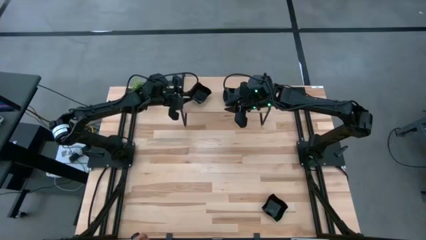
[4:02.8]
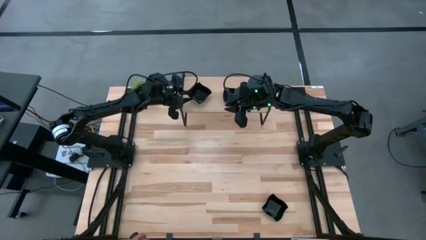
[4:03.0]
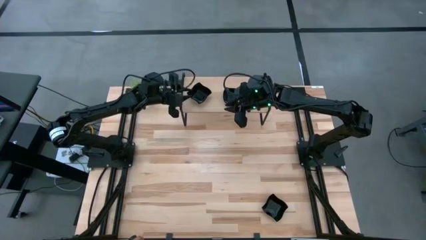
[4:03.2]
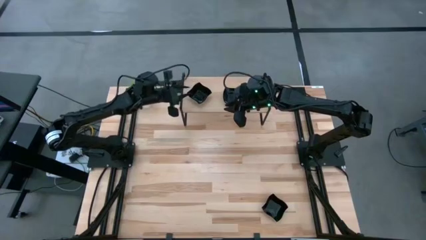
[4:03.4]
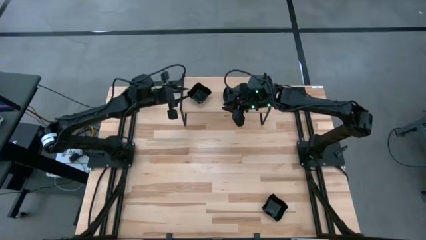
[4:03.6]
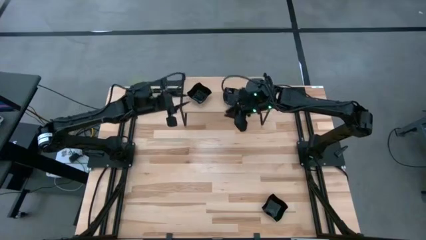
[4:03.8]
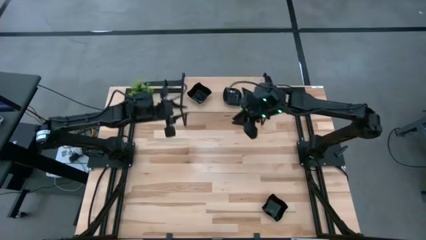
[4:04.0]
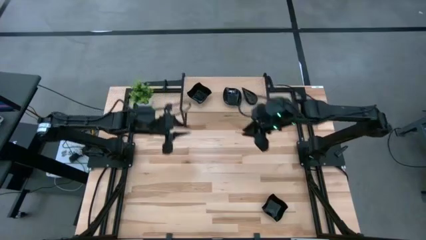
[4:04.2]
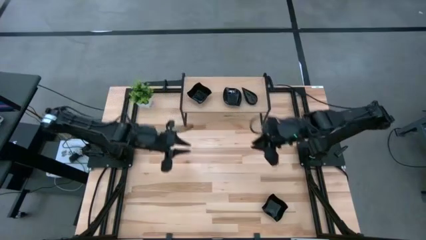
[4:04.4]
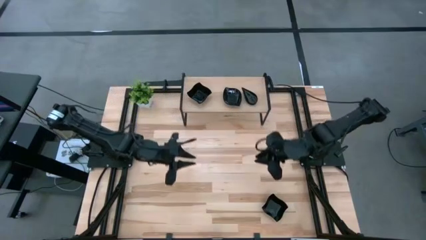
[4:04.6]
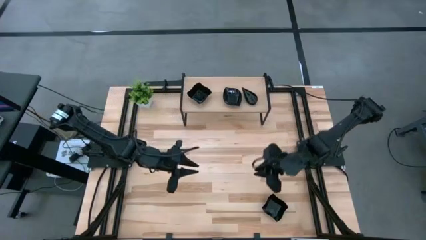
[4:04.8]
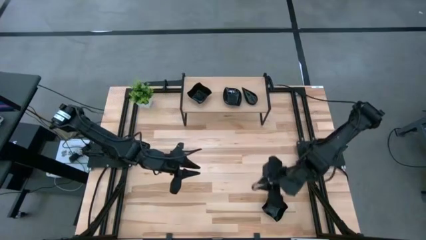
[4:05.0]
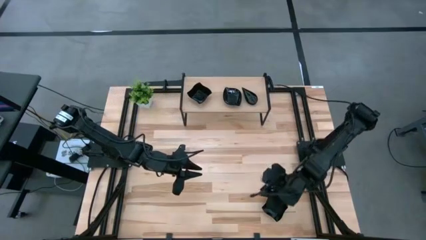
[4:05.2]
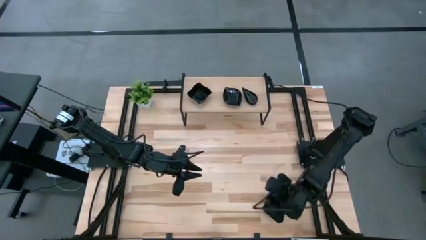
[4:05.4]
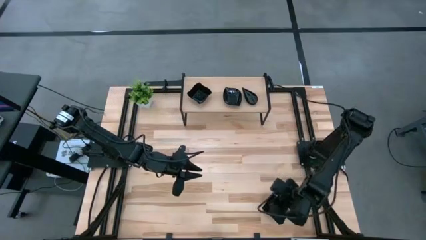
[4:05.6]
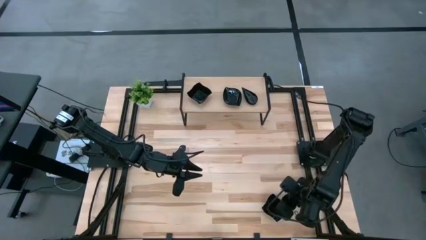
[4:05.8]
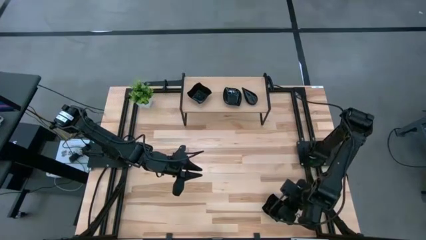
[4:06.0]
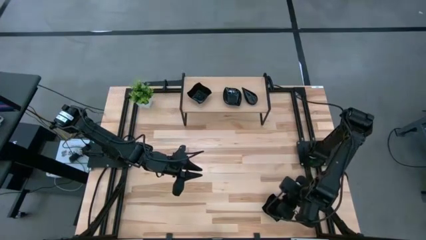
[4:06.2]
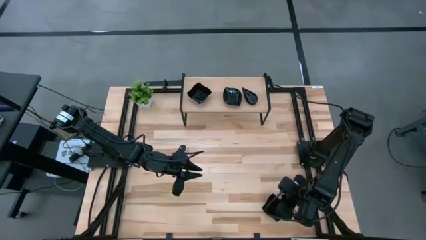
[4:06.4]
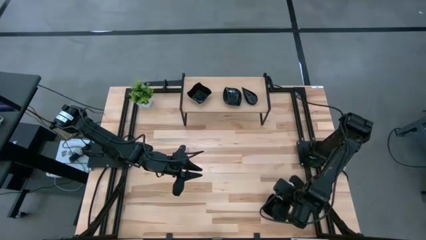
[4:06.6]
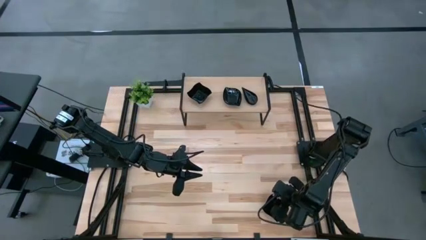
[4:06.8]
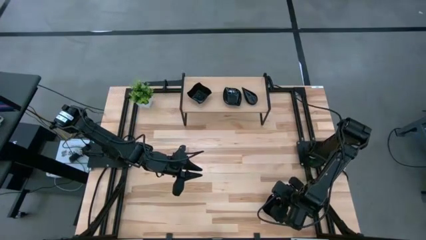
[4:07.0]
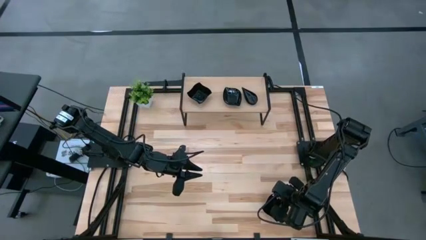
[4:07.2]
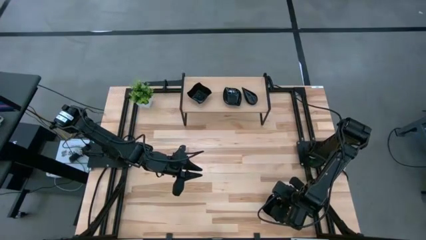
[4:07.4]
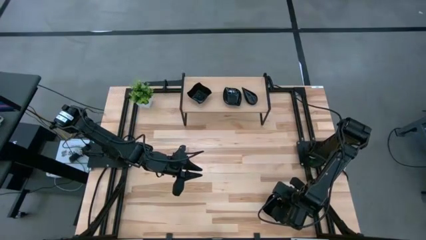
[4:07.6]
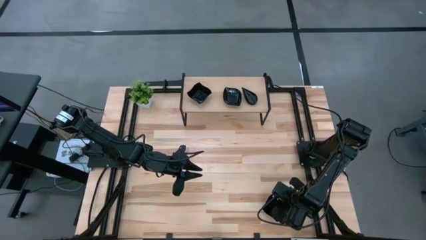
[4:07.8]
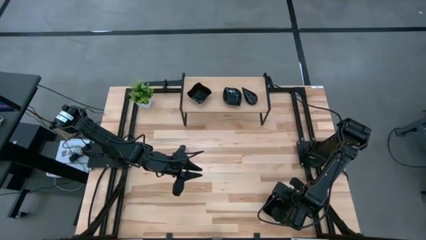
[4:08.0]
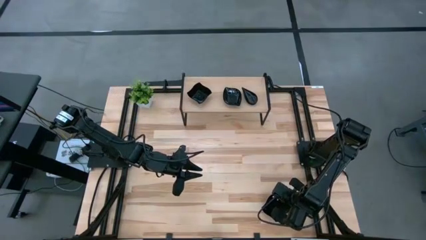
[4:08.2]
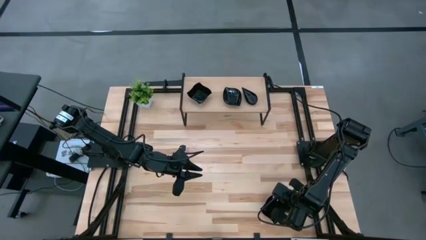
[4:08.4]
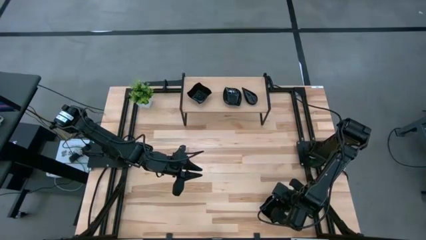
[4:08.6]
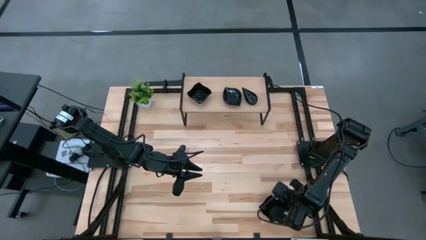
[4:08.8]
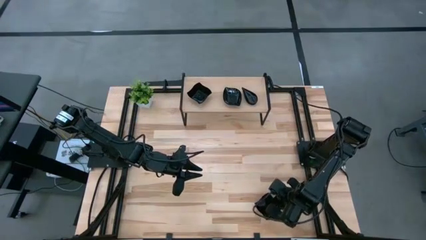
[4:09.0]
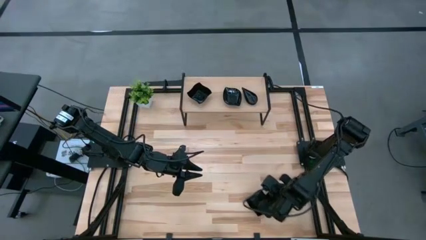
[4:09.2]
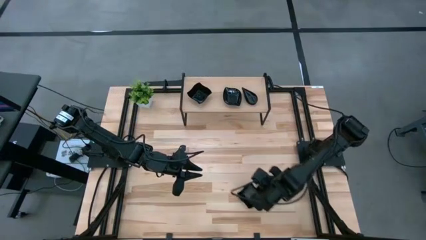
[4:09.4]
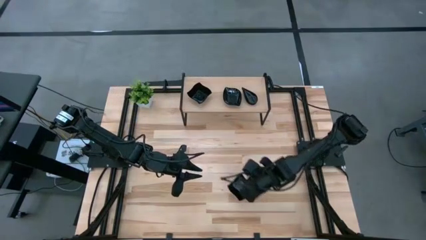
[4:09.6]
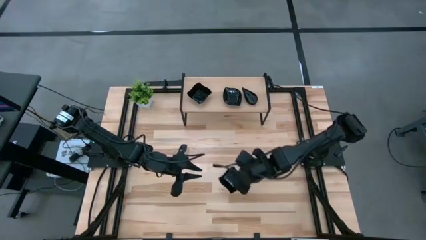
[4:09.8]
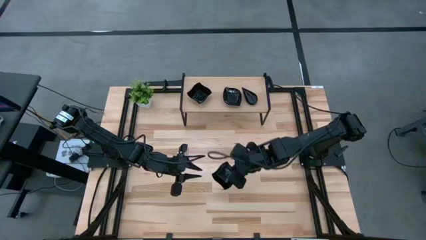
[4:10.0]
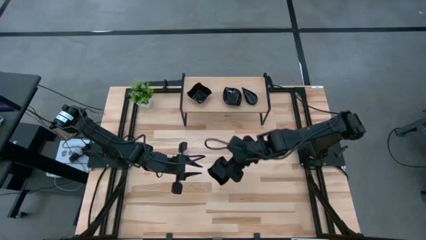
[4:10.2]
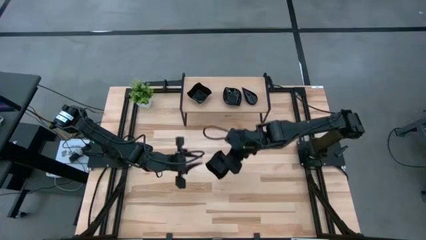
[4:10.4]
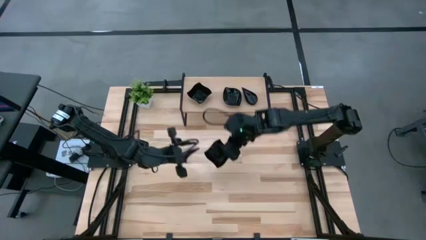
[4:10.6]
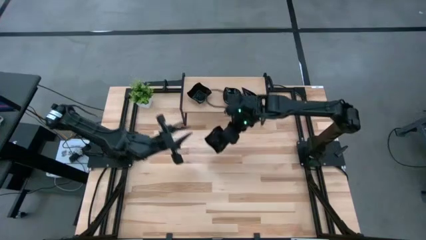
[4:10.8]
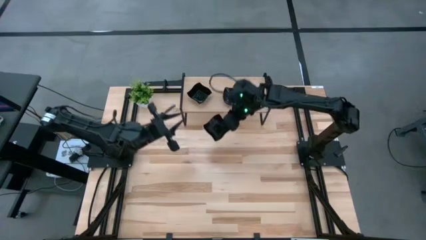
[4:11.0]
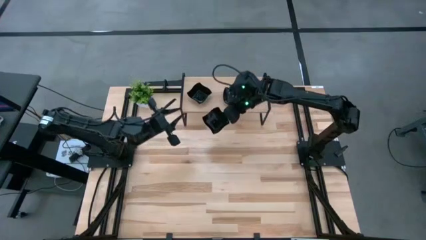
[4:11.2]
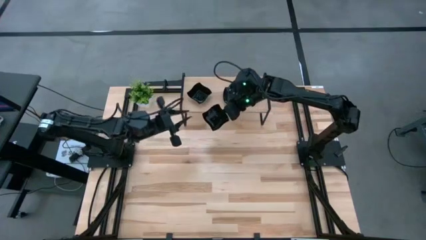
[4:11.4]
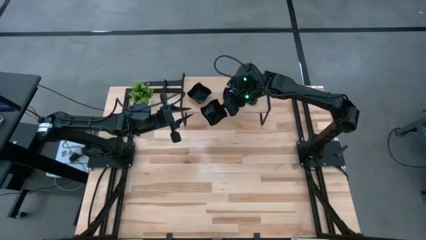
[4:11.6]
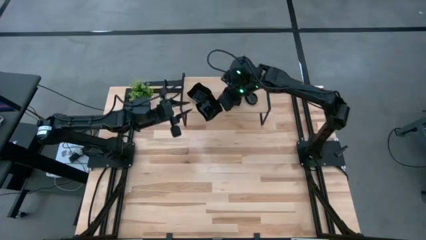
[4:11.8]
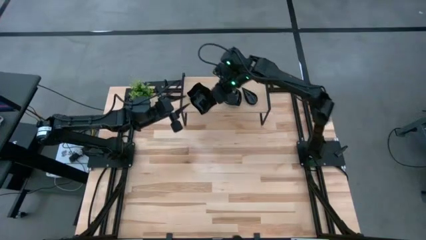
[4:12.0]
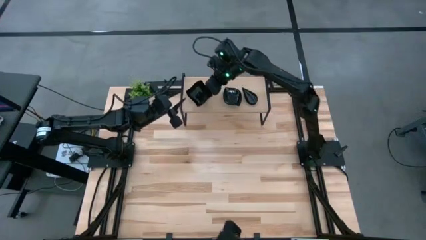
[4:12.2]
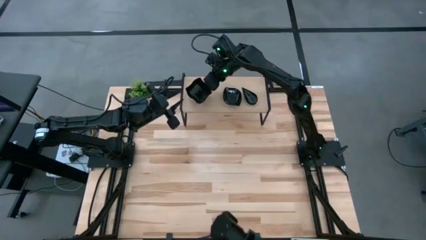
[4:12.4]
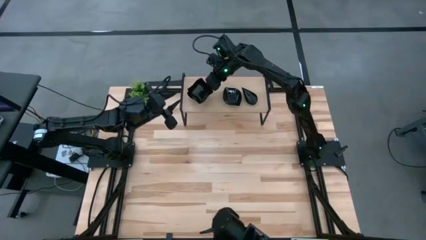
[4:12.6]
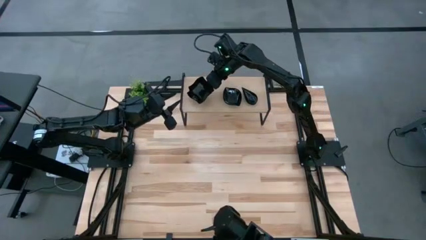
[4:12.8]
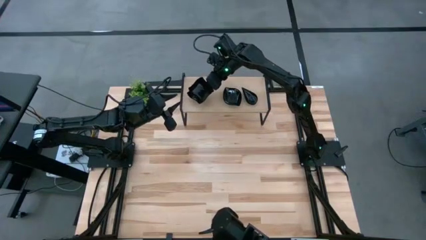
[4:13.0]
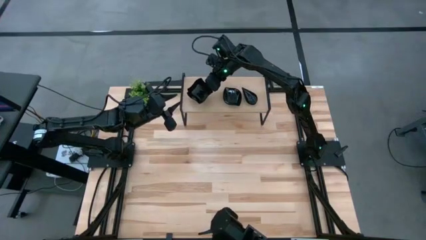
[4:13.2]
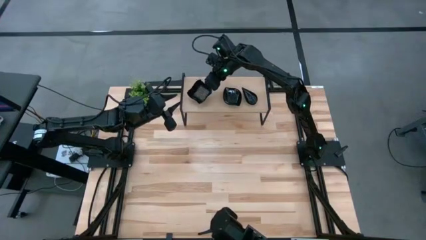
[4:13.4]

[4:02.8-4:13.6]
Task: Pick & Place Mini shaped plates
Stack the black wave square shaped plate on top of the black wave square shaped plate on the shelf

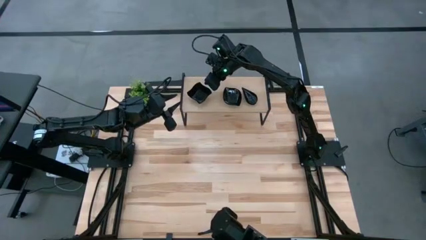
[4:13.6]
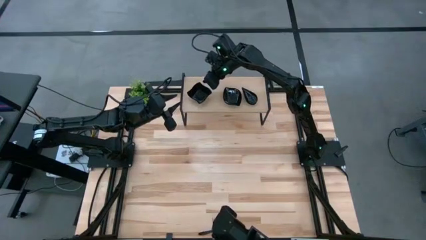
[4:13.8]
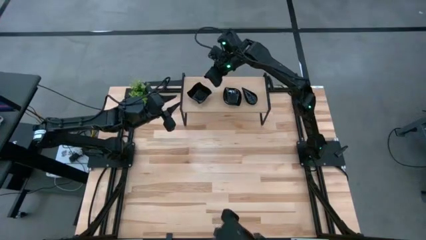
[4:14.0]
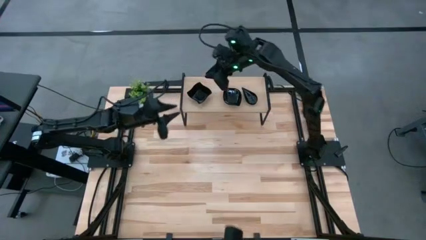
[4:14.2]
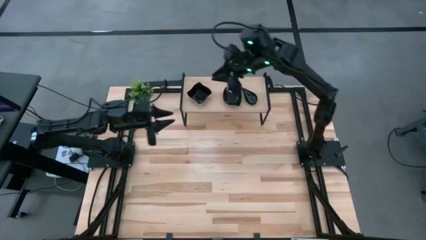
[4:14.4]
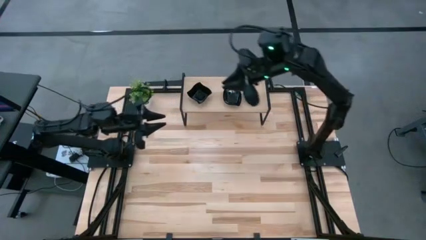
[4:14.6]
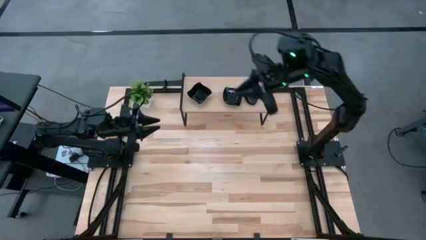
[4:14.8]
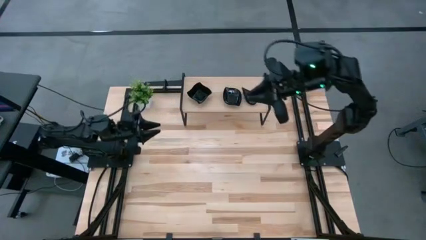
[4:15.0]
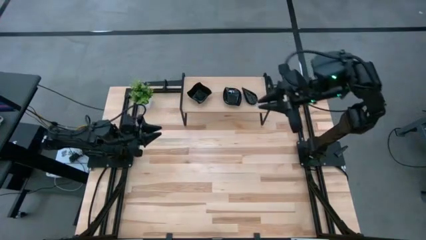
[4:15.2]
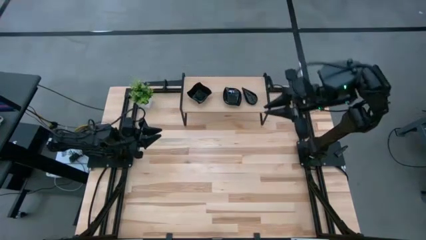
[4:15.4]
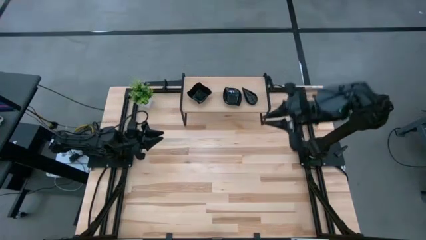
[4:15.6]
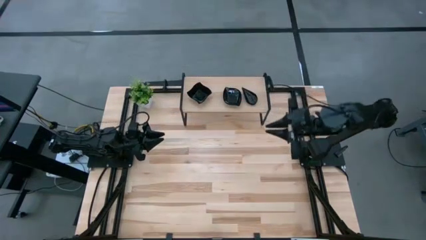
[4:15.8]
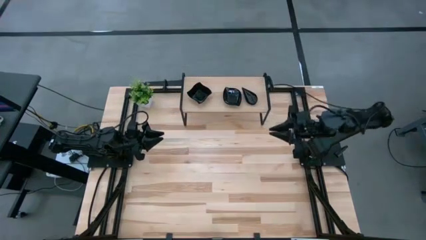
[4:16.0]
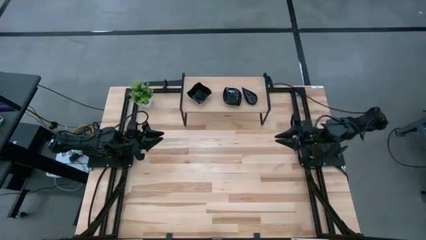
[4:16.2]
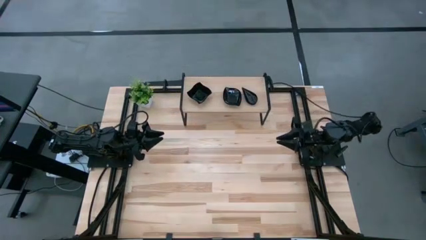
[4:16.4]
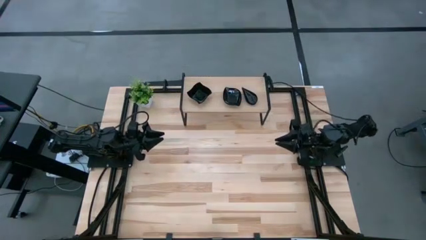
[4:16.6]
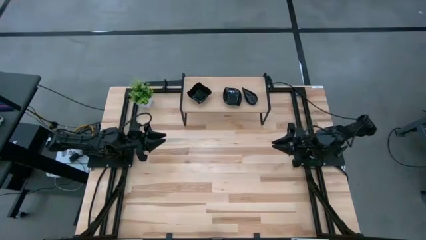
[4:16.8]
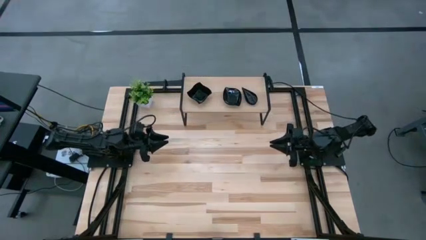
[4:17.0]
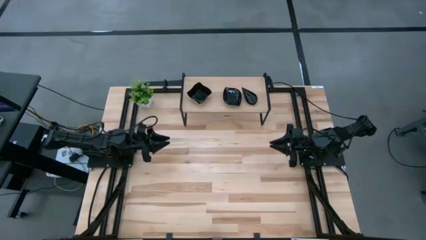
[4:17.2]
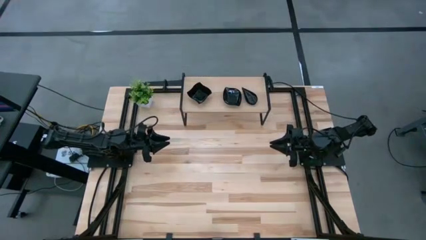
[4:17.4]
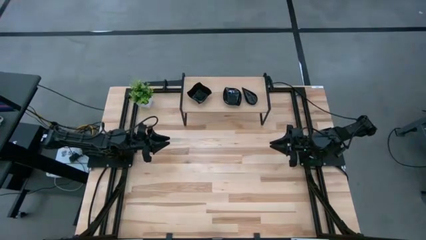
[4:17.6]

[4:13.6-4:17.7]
Return to Home Position
